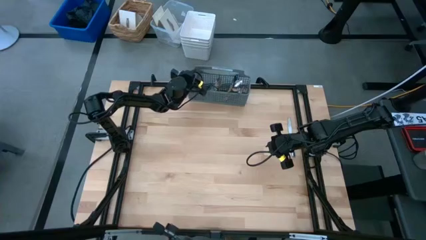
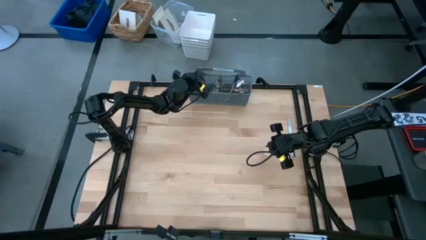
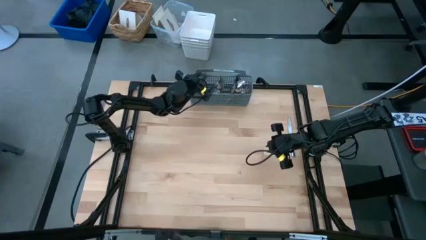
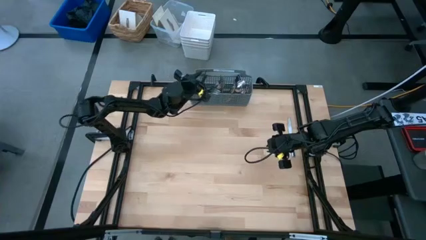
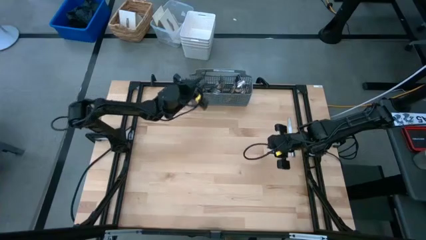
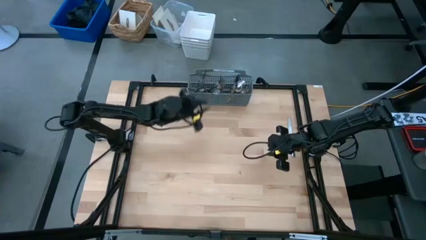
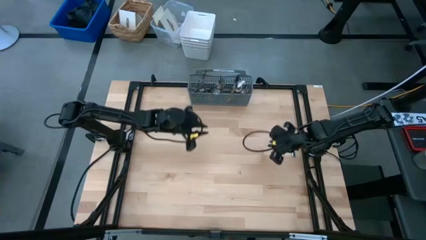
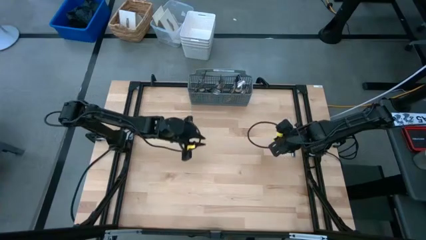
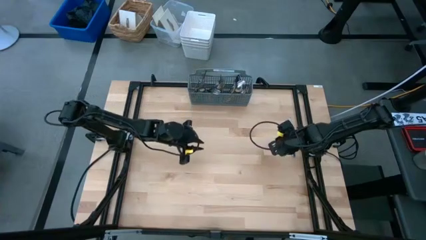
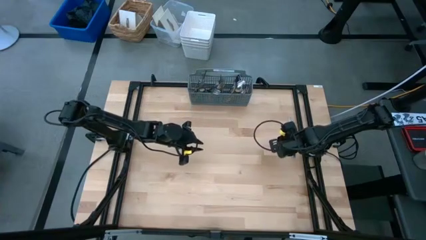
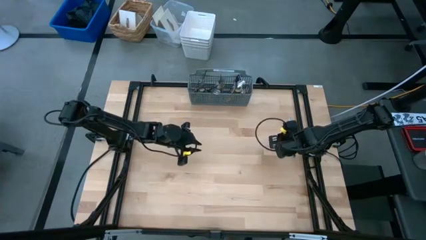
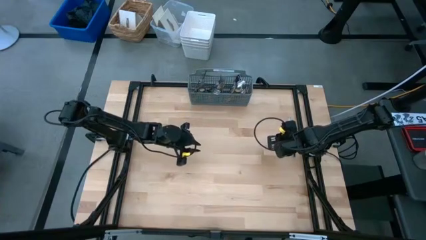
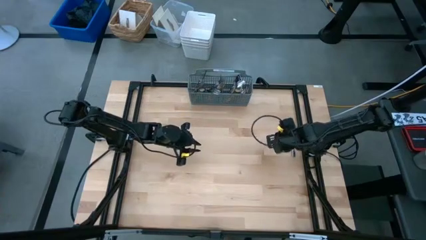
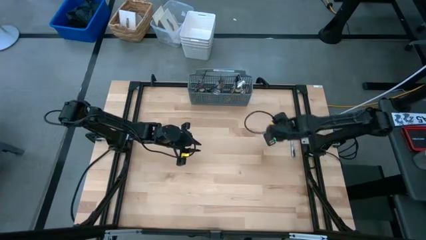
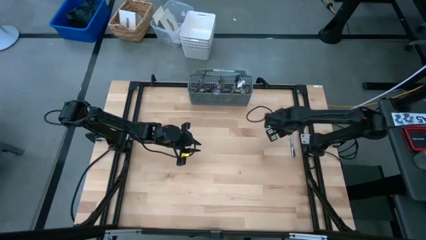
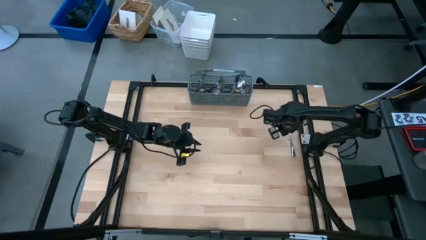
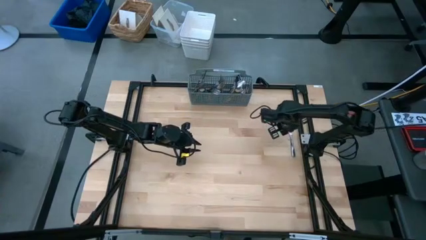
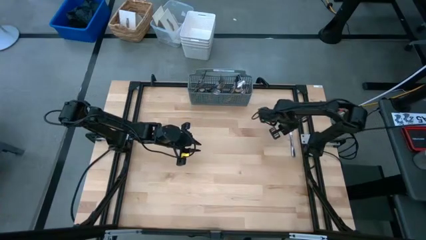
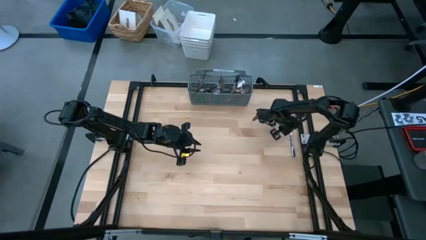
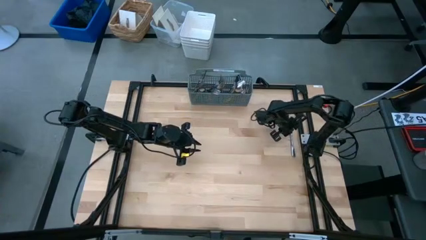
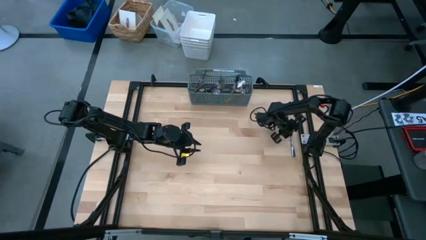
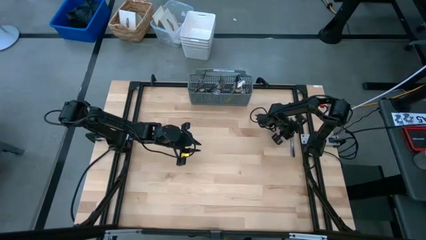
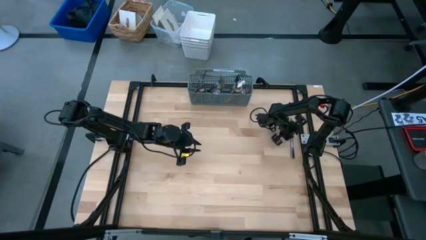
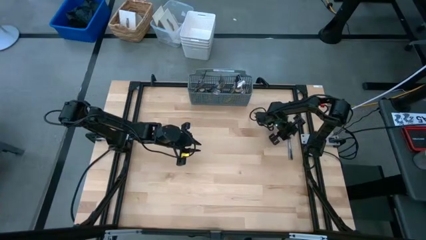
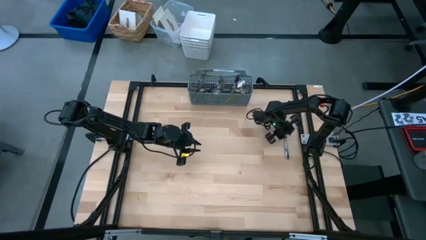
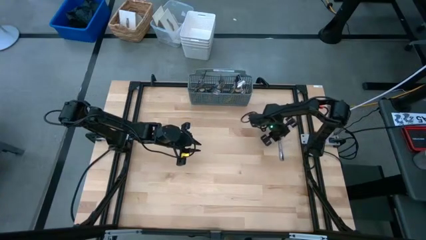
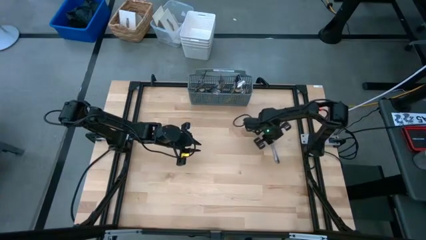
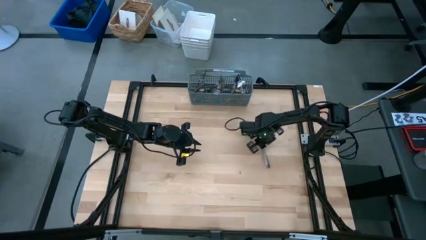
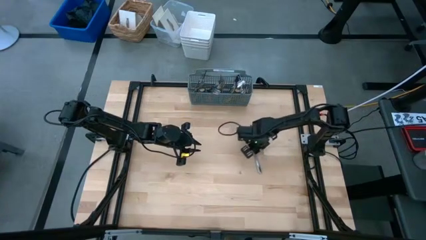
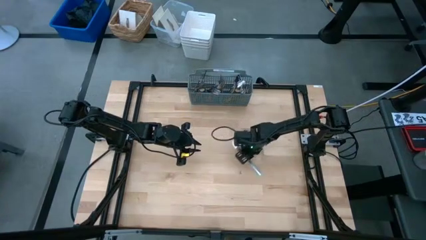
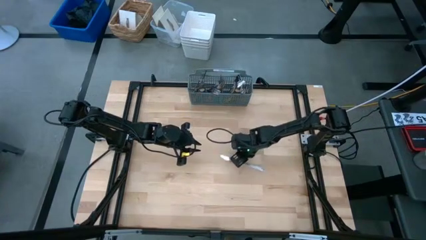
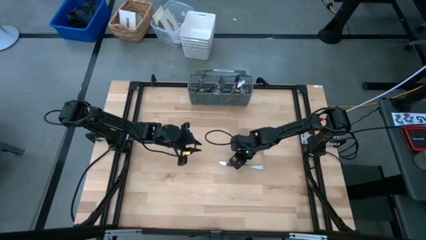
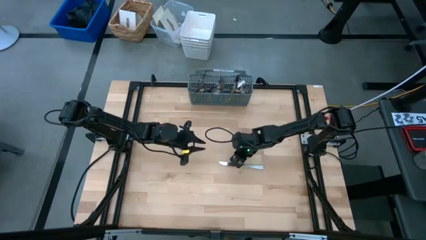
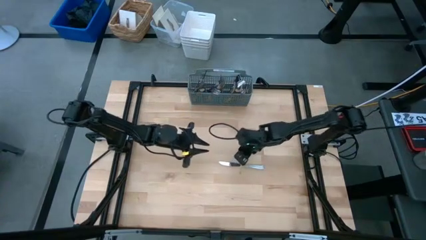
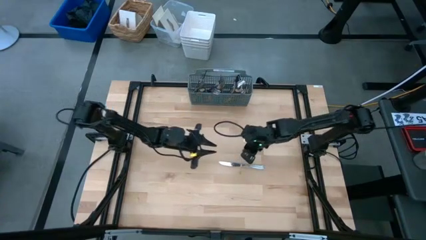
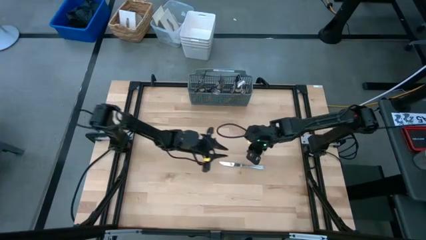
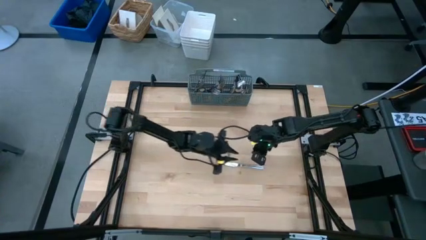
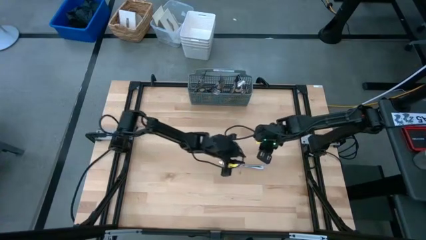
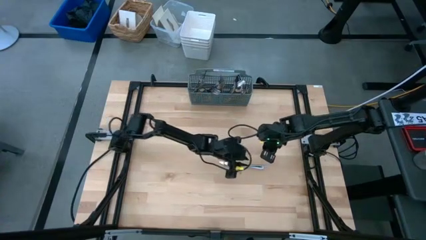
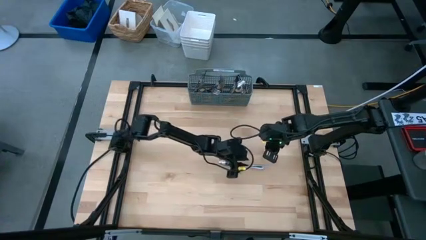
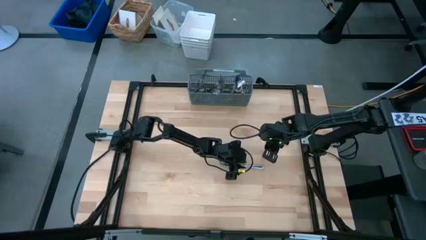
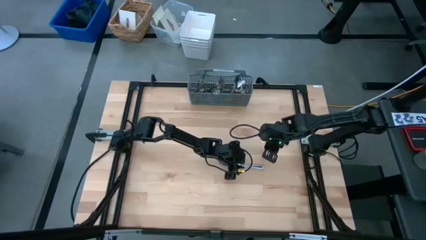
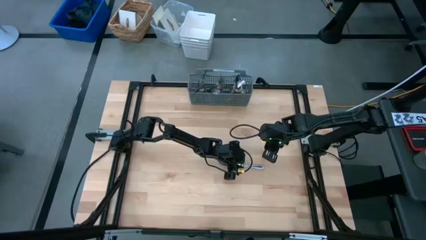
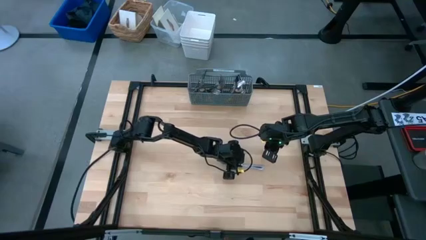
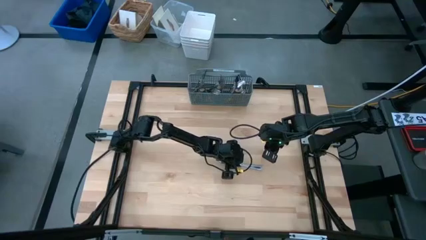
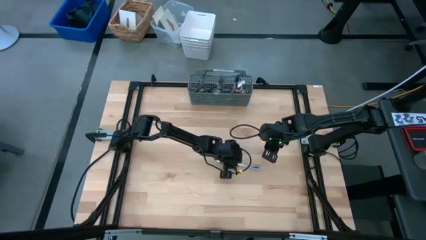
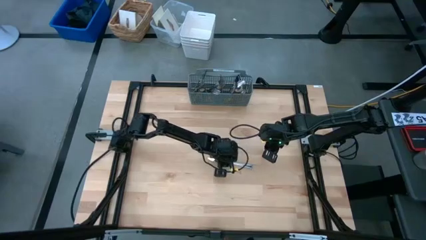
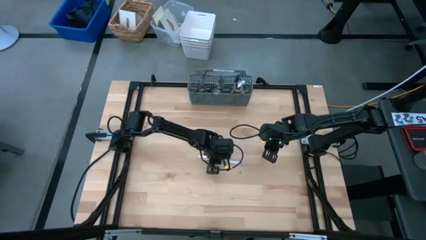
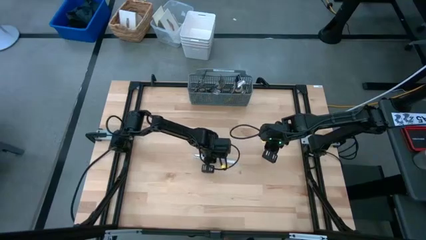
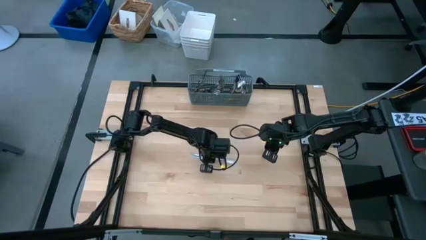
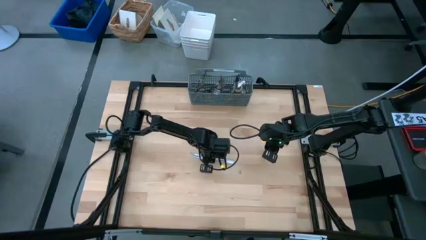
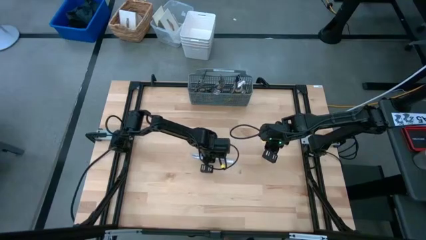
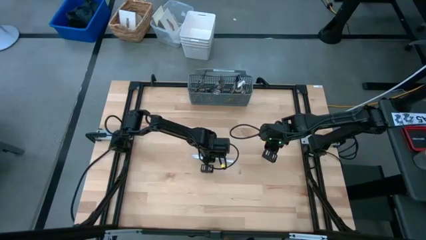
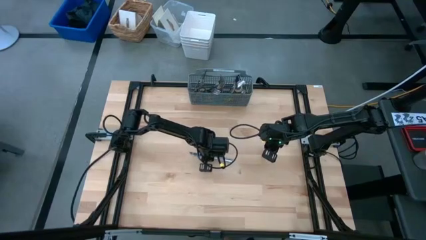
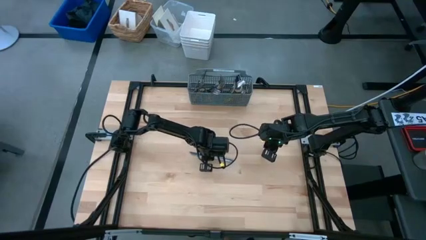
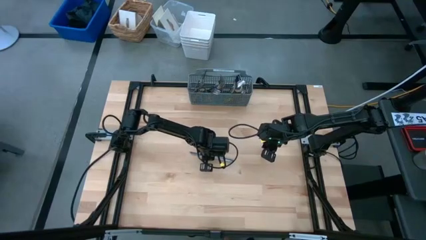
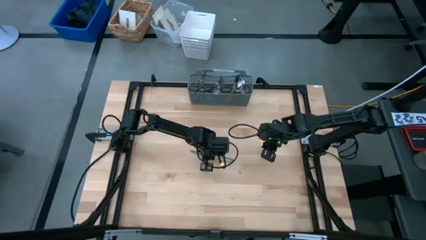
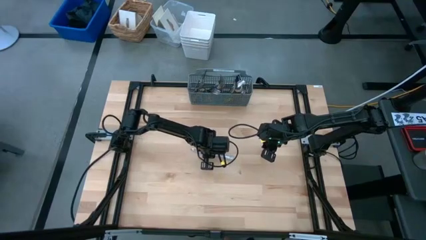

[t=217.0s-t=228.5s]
Task: Sort silverware
Put the table knife into the gray silverware organizer

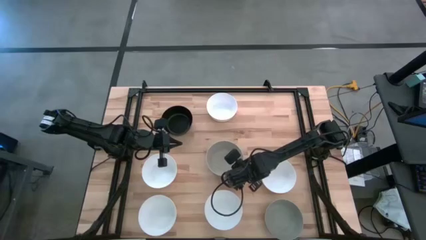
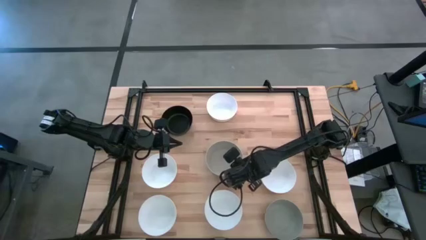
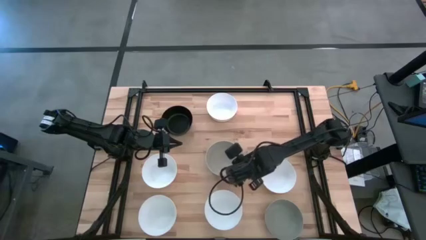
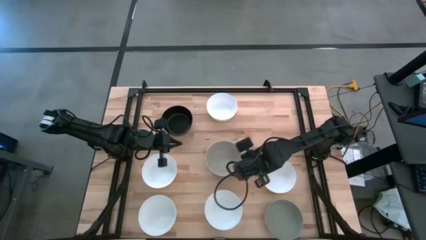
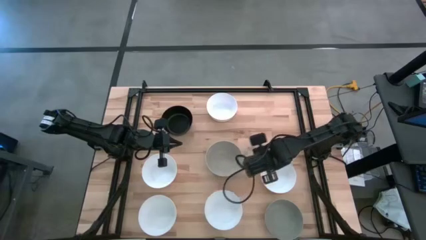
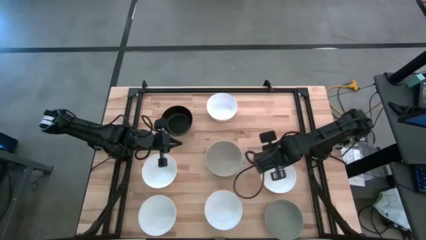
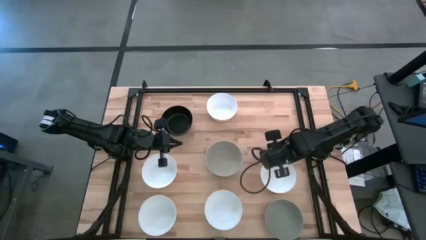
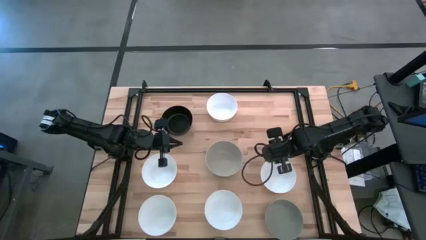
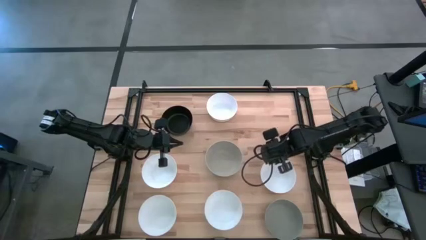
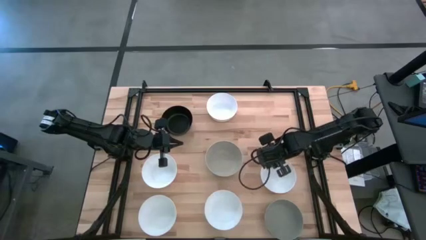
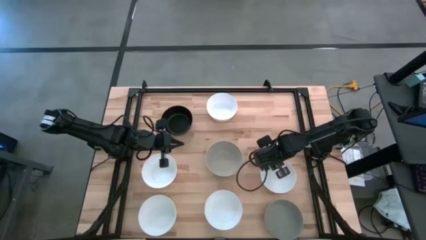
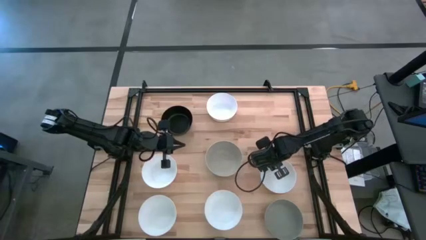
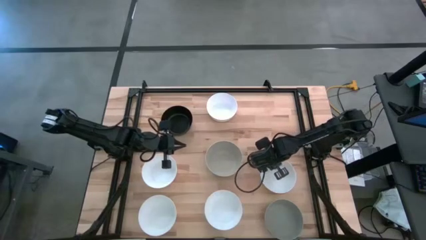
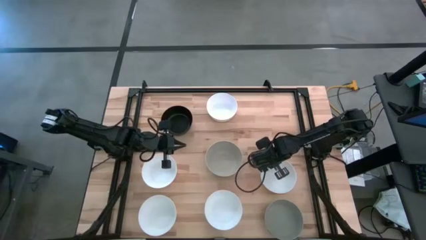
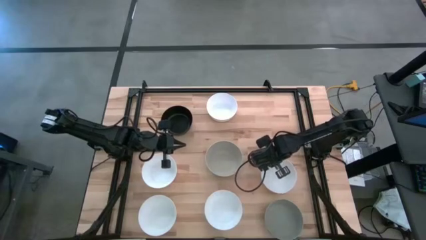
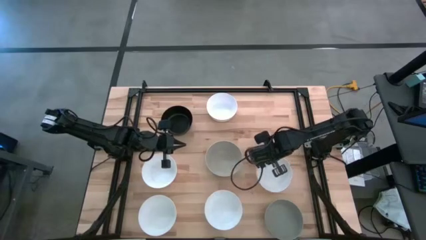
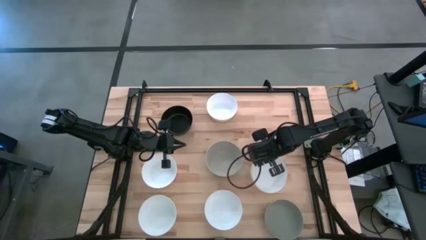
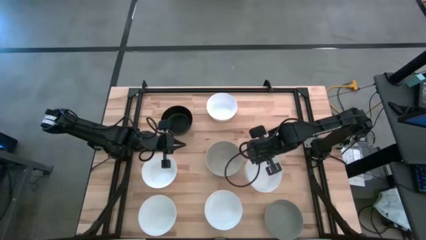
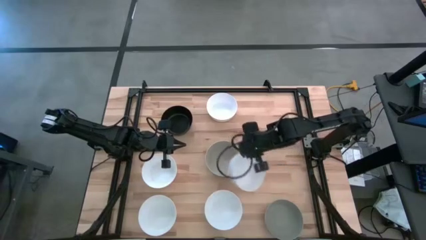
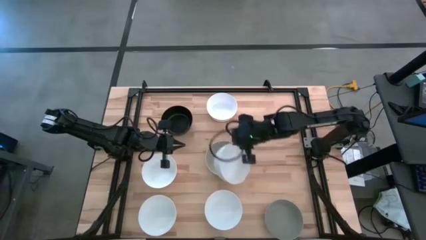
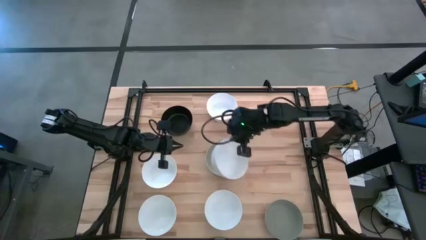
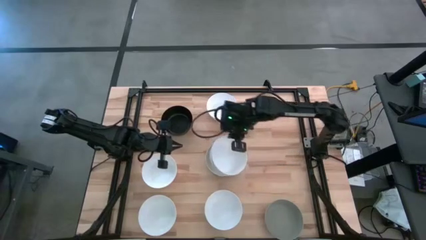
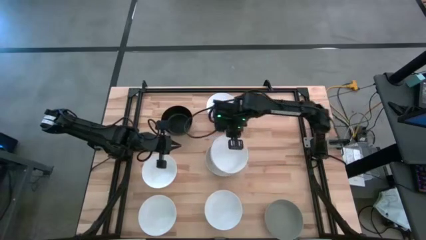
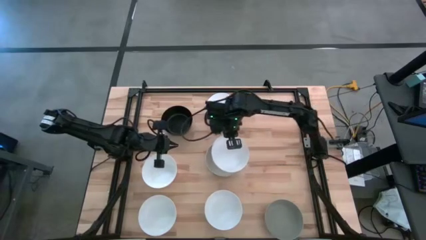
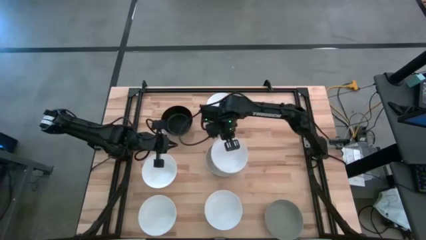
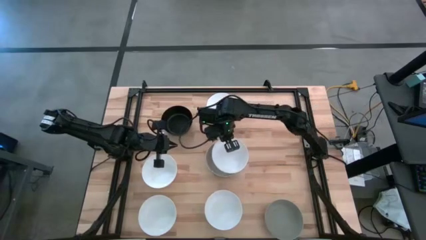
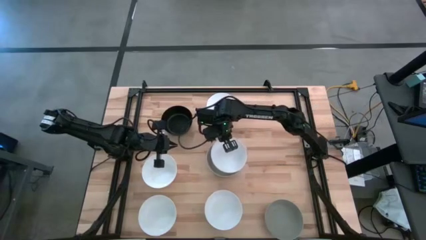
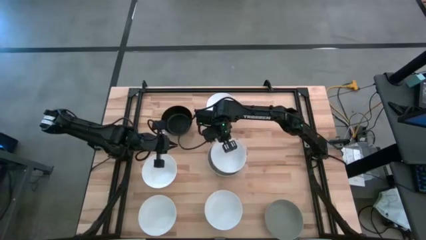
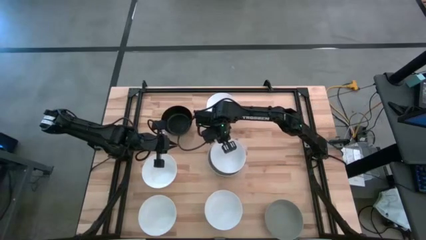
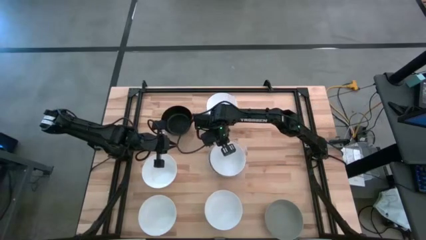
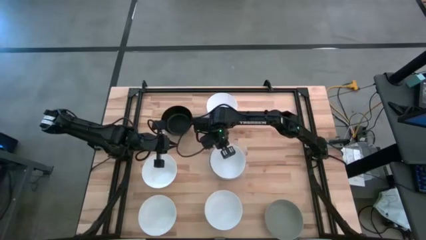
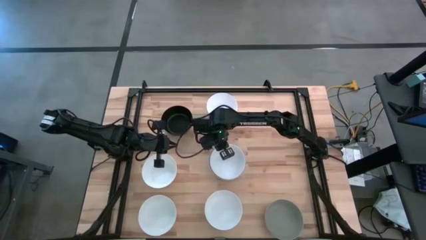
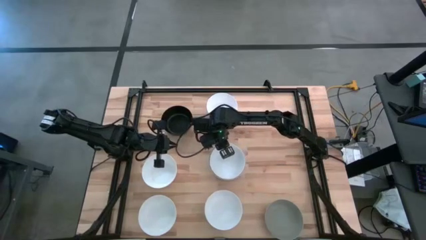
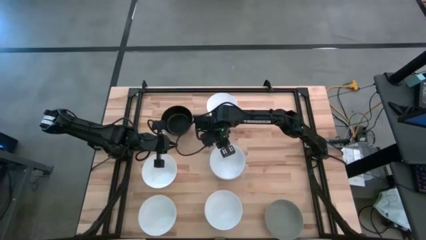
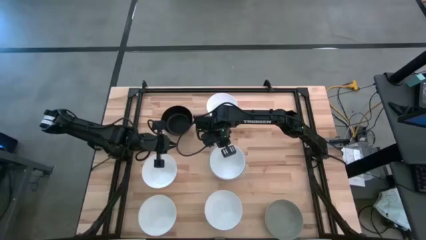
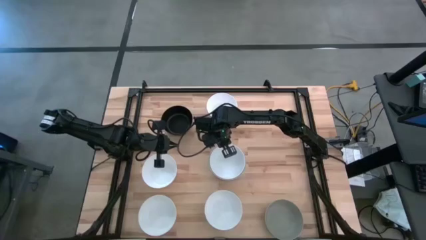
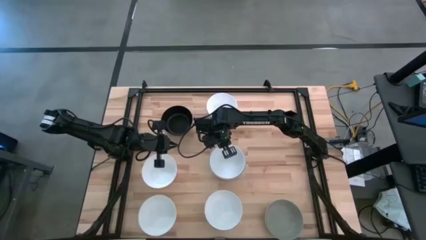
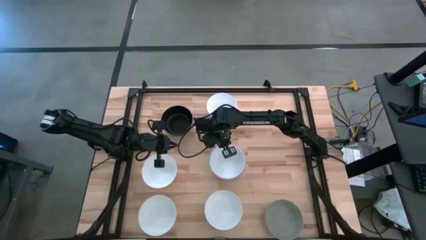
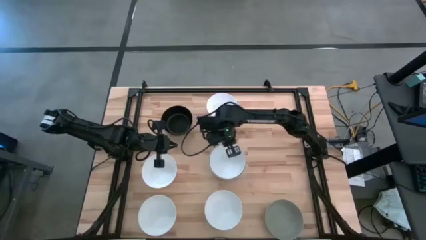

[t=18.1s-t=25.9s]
Task: Nest bowls inside each other
Stack the white bowl on top of the light brown bowl
